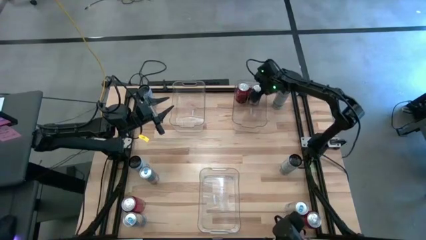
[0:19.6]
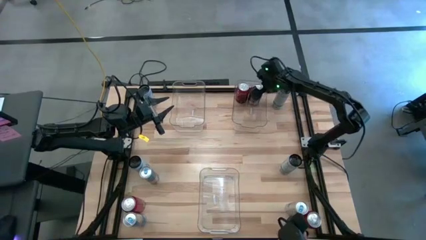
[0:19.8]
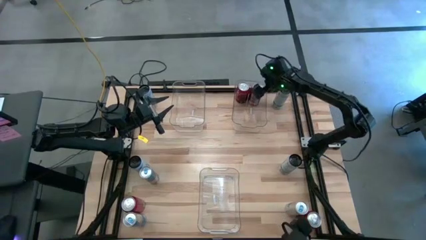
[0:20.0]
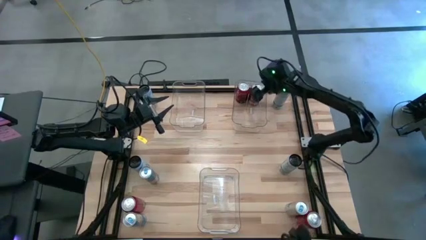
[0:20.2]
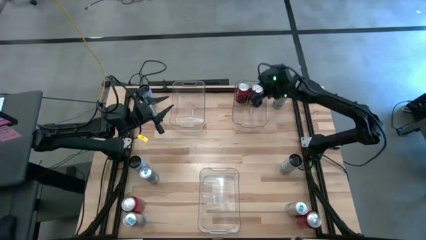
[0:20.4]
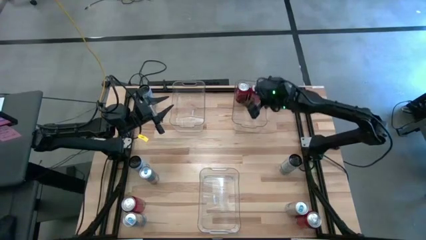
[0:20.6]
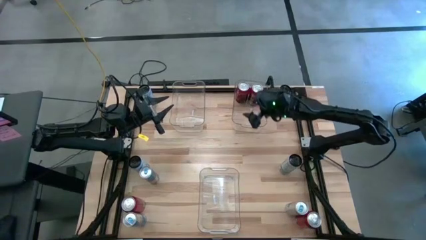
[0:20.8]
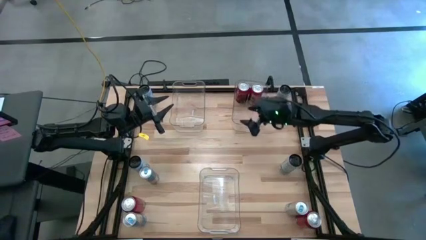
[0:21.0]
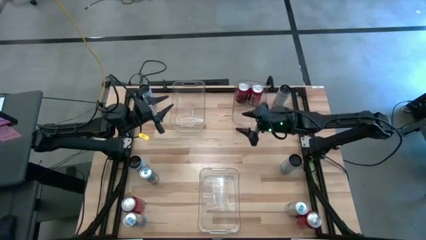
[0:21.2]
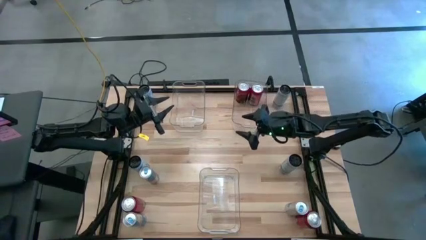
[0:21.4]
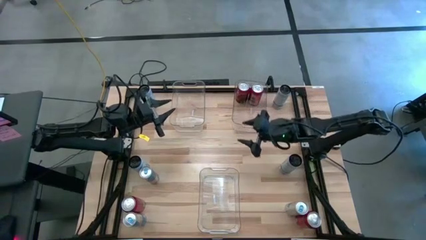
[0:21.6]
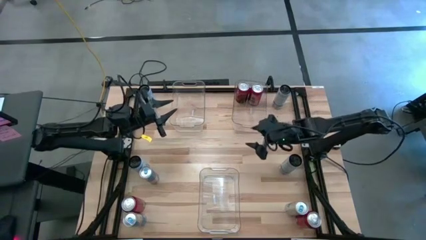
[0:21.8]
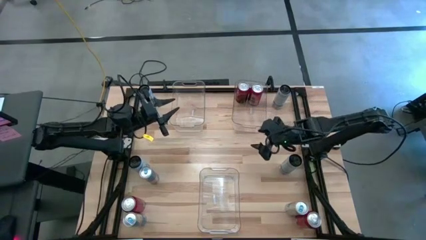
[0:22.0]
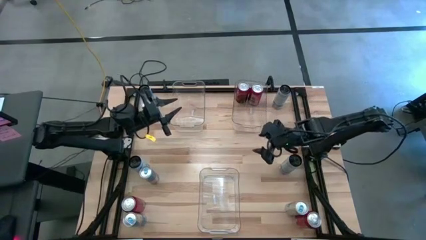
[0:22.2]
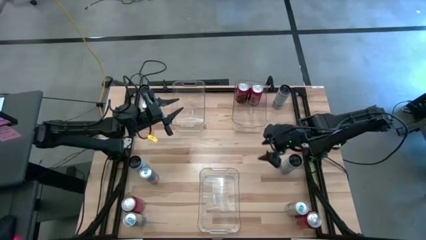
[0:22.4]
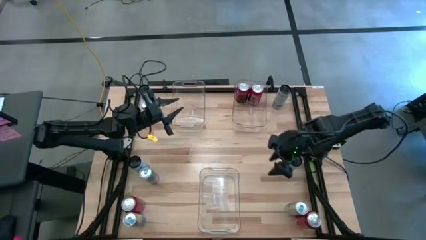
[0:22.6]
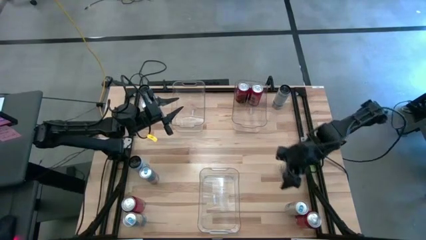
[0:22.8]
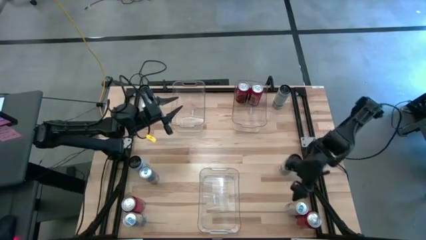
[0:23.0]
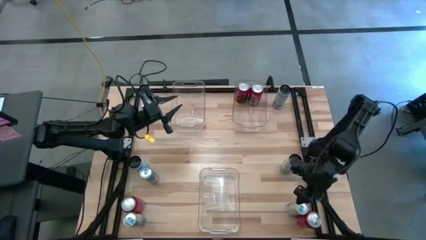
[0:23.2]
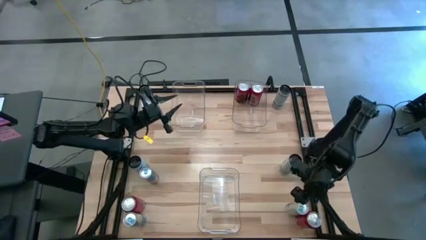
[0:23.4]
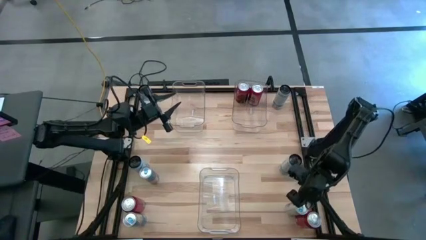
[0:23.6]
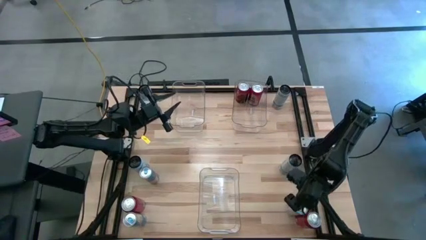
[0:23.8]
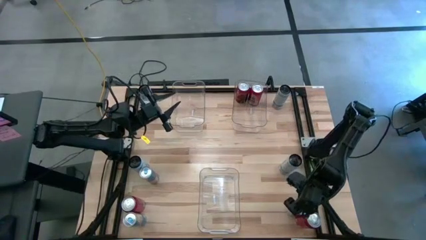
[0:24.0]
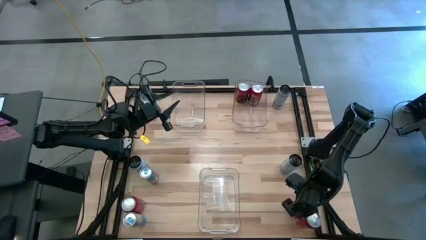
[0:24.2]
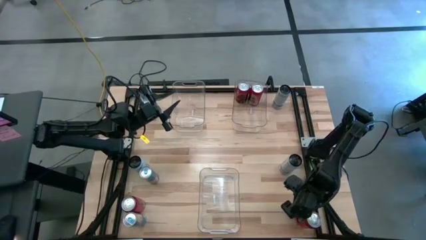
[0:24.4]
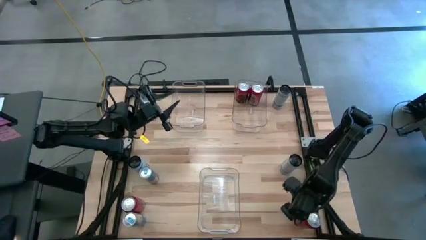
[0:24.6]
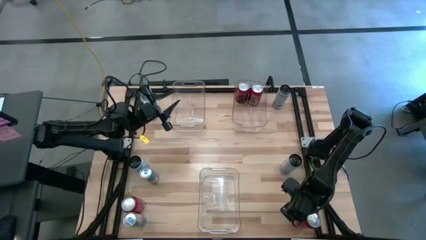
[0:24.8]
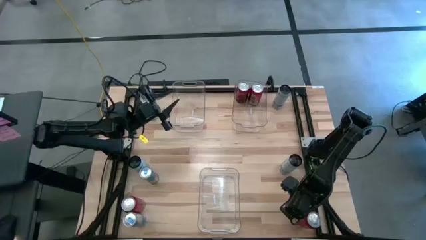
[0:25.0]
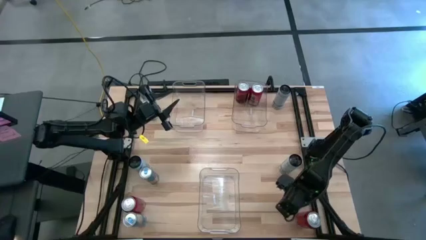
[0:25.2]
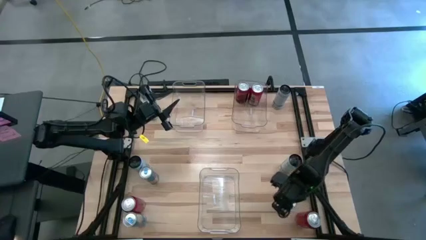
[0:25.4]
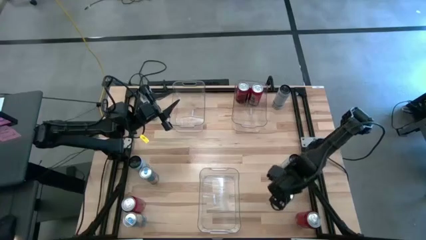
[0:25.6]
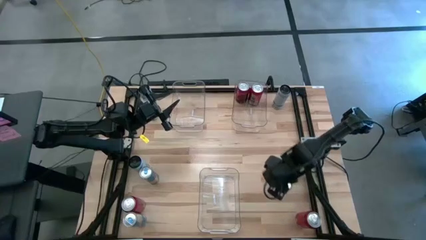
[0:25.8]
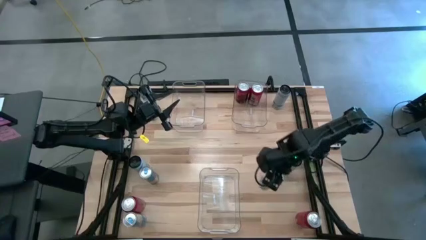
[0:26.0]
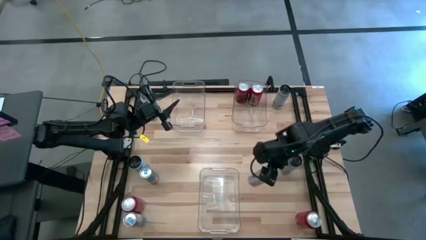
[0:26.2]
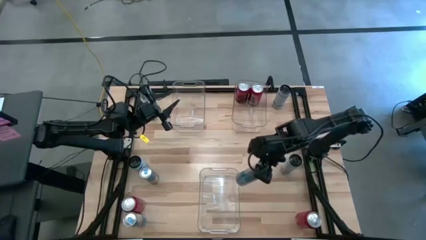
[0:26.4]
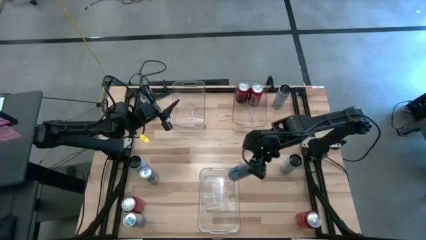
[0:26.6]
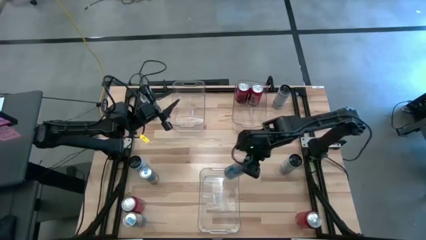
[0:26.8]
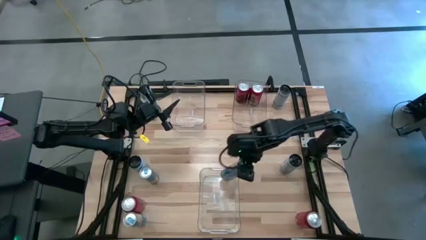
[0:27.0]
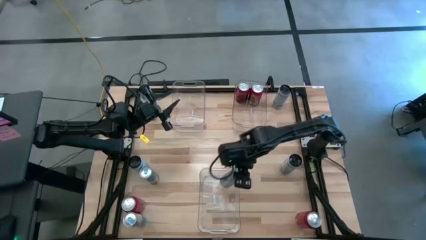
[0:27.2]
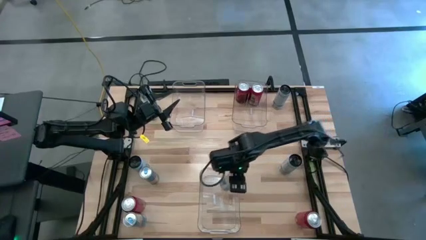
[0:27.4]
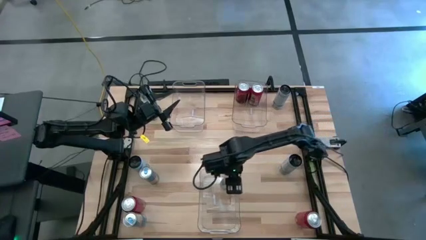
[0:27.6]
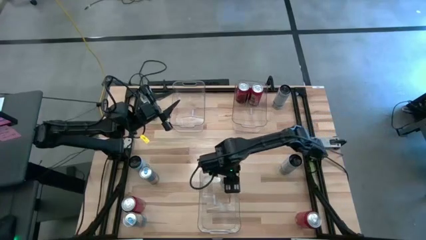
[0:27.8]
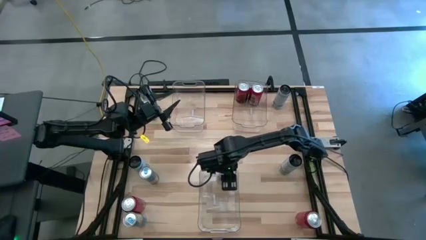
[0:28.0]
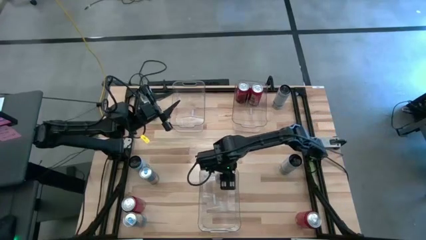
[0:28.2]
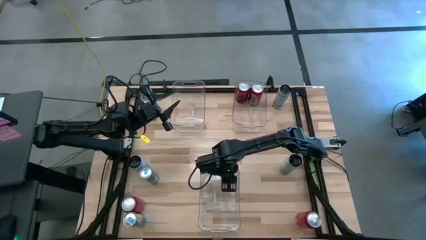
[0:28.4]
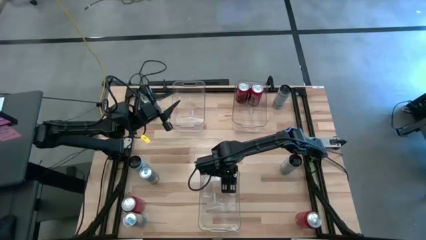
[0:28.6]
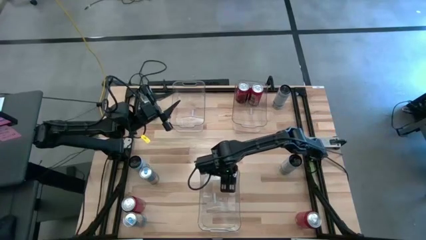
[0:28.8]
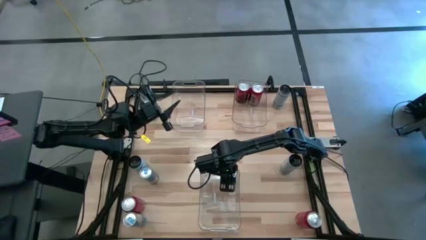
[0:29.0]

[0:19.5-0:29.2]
Task: Sort soda cans
Put the bottom right blue soda can into the bottom transparent bin

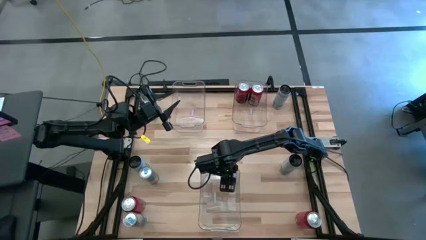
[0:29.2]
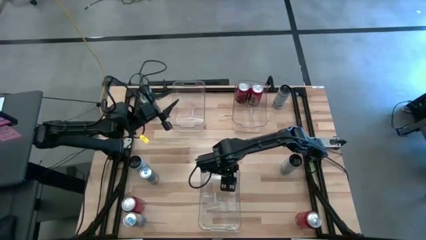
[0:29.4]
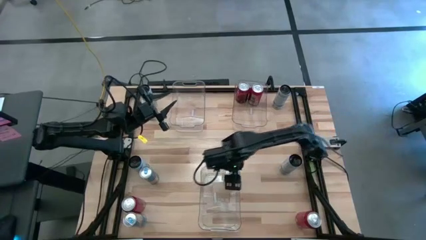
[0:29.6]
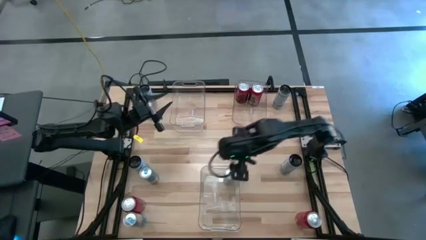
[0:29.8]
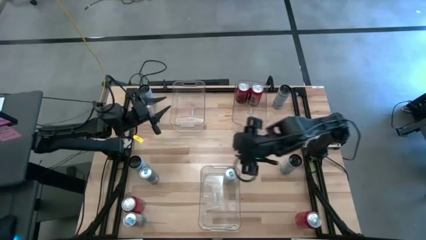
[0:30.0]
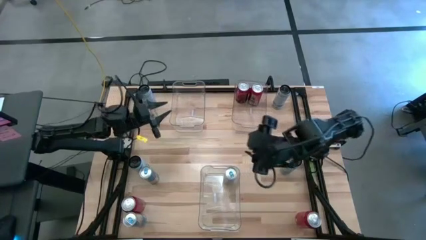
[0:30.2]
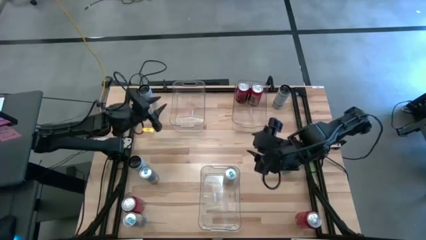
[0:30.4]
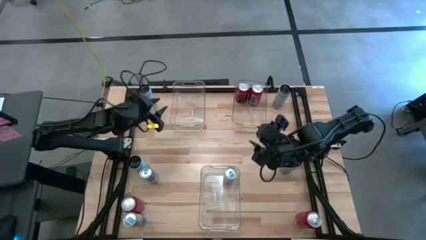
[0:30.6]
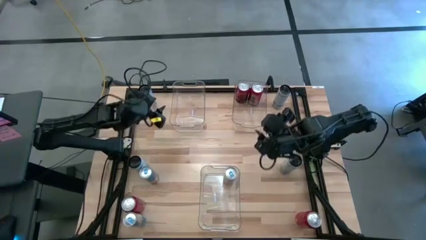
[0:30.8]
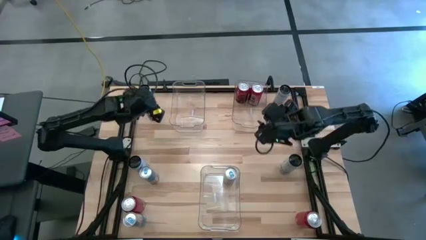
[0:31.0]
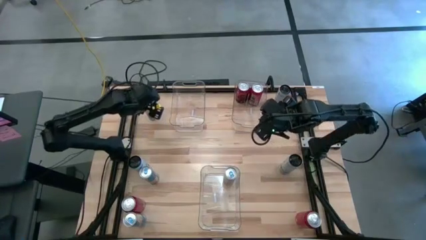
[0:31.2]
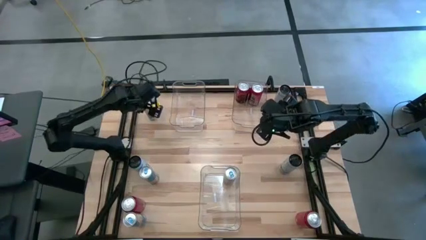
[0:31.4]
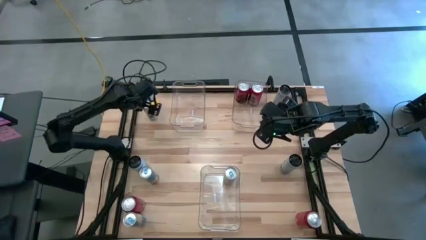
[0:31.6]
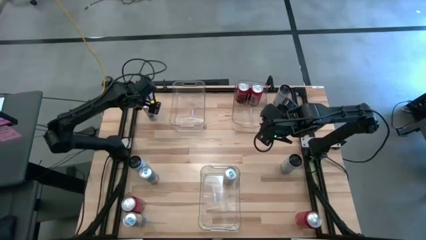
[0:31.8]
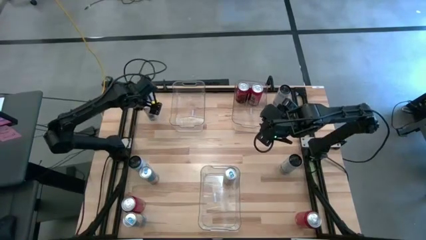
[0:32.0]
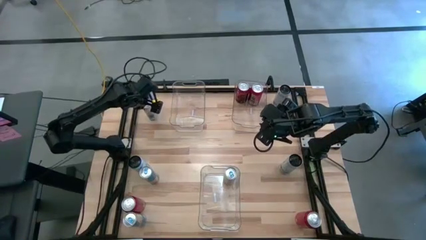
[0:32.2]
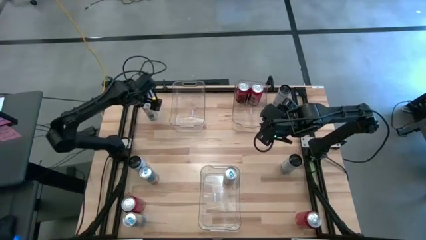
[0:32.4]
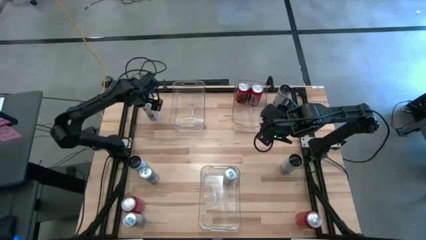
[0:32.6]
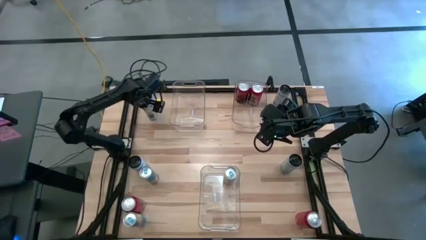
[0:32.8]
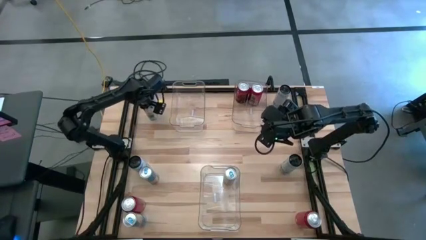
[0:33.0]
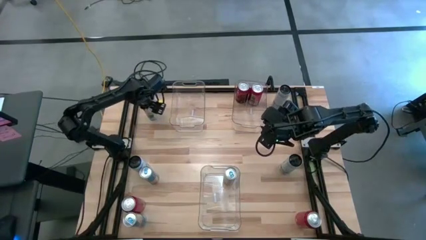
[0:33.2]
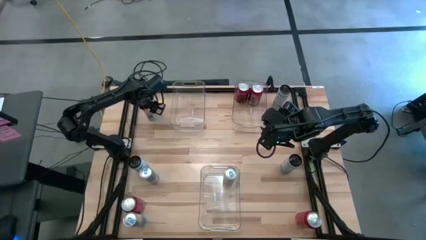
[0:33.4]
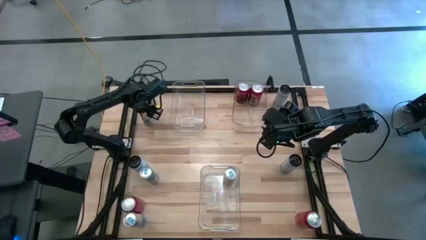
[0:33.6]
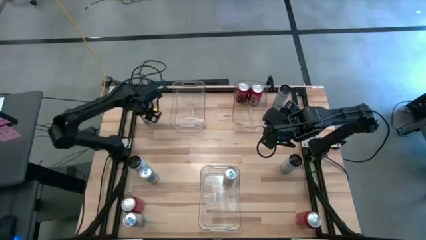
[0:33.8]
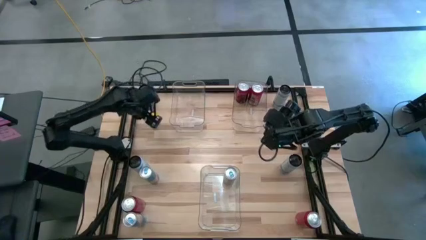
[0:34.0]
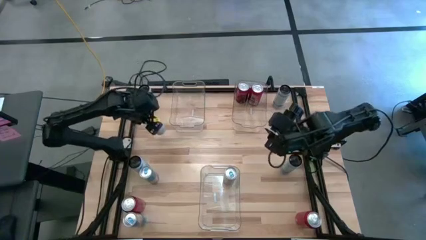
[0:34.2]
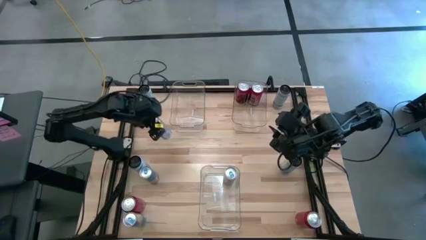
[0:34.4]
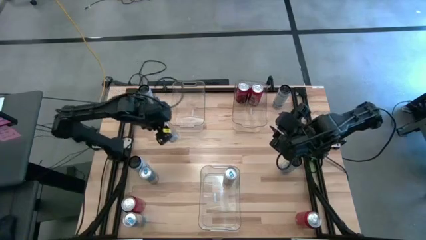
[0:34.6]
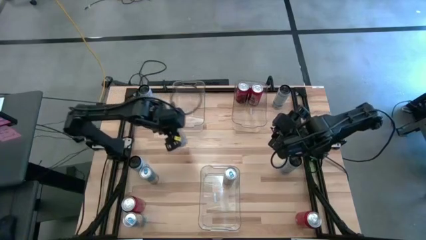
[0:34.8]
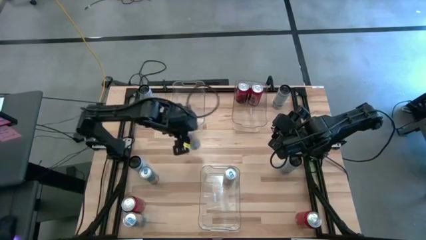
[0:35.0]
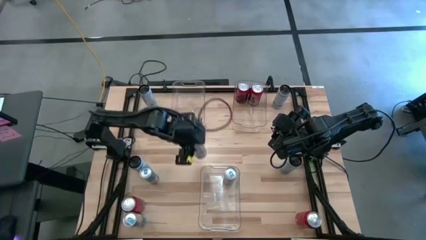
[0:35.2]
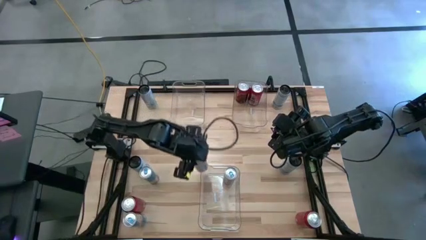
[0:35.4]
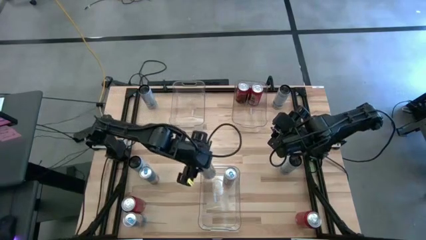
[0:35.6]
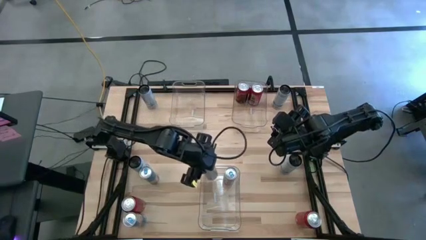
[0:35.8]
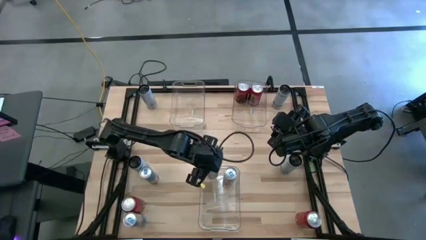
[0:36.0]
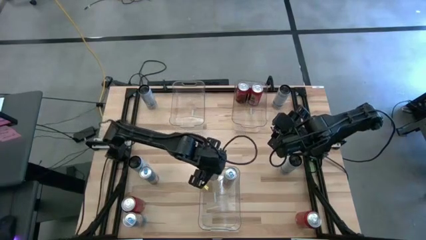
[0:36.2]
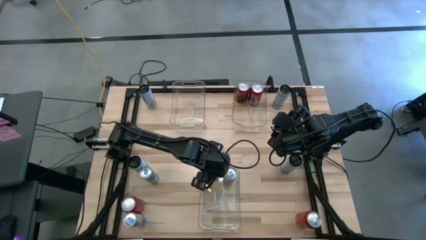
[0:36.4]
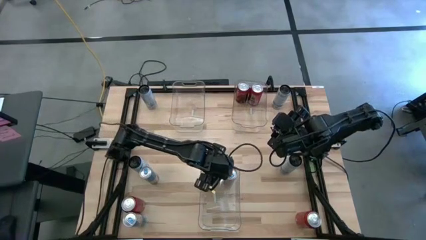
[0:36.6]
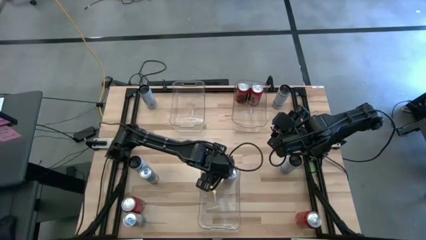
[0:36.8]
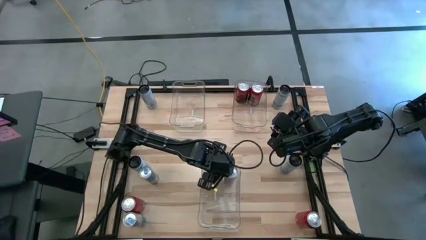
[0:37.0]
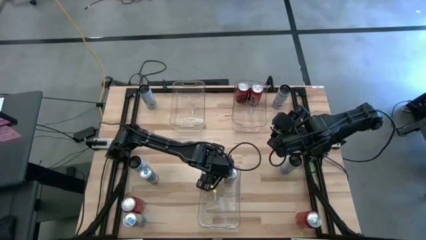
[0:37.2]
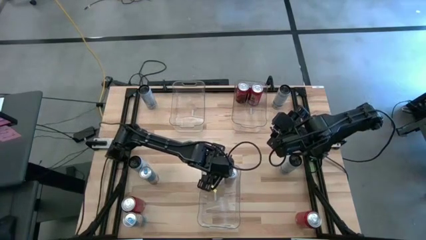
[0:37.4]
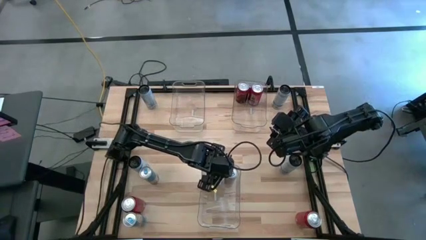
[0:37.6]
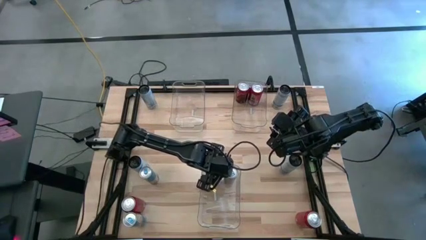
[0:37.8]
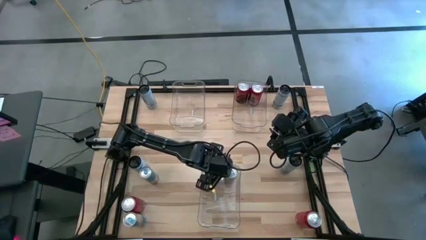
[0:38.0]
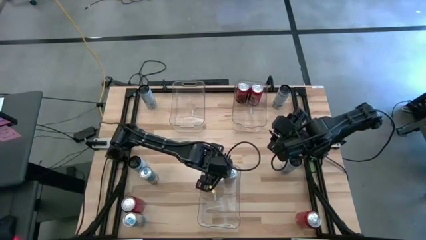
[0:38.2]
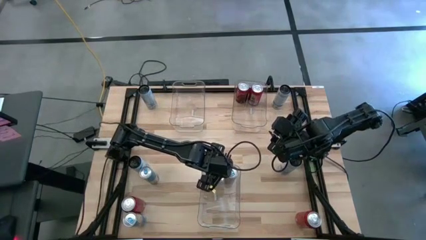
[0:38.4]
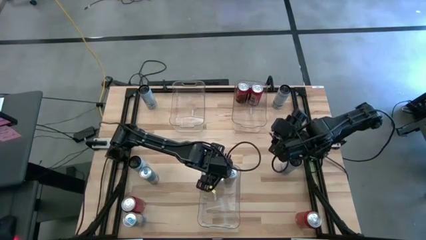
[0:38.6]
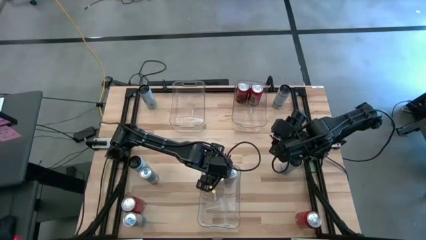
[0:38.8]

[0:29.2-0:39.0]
Put the top blue soda can into the bottom transparent bin
